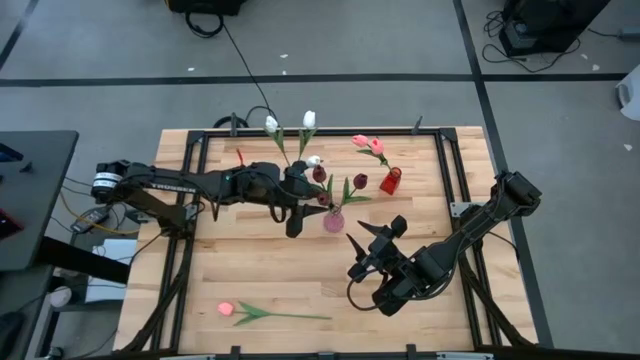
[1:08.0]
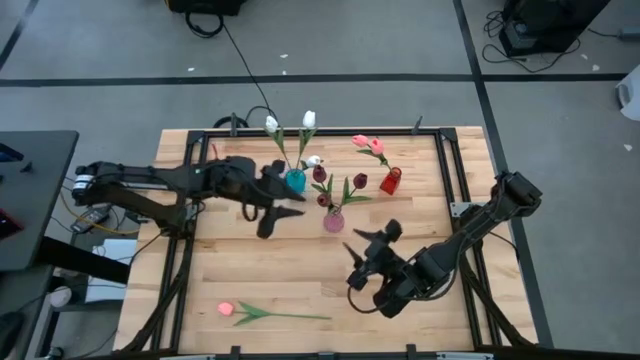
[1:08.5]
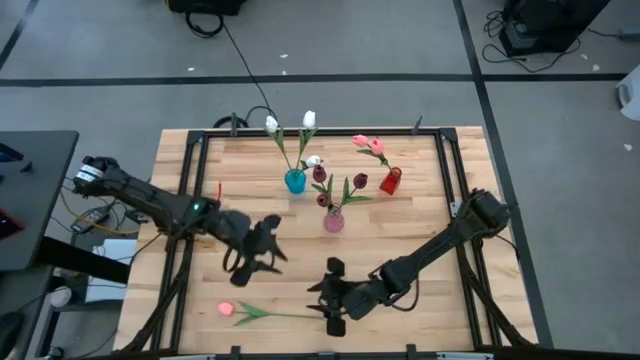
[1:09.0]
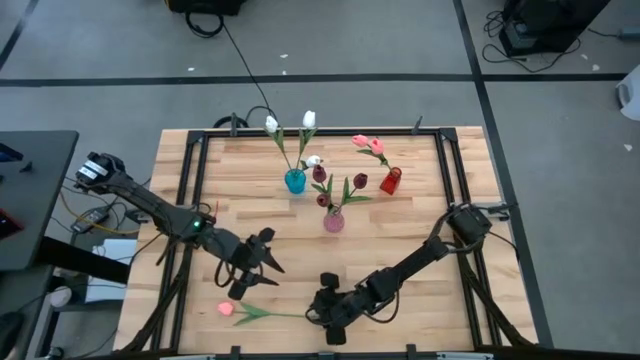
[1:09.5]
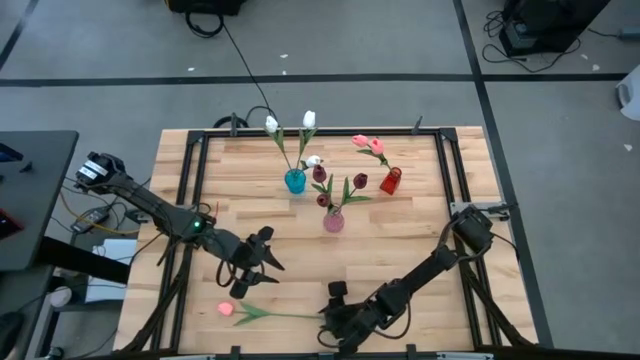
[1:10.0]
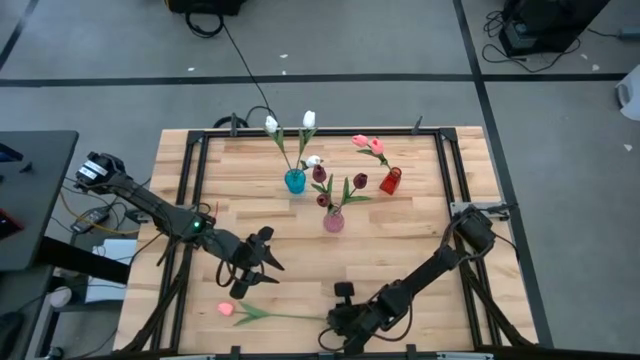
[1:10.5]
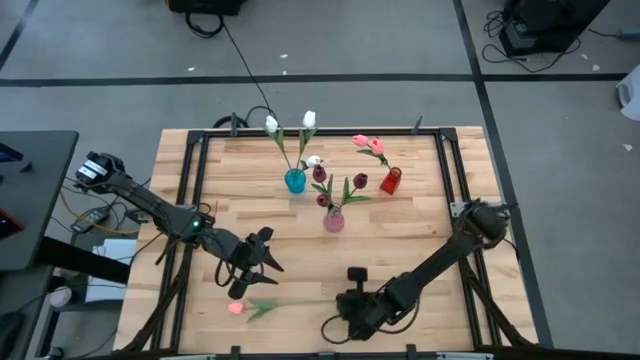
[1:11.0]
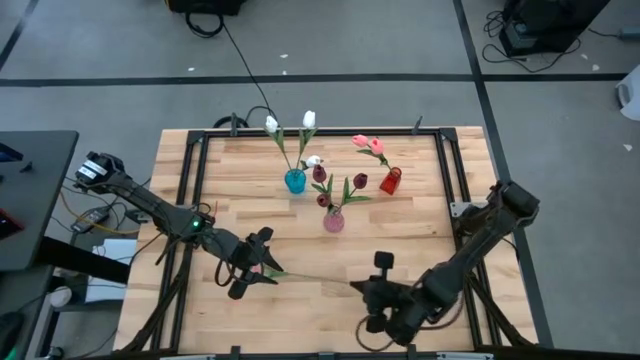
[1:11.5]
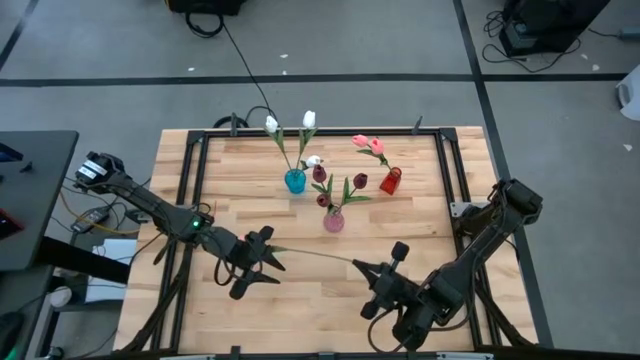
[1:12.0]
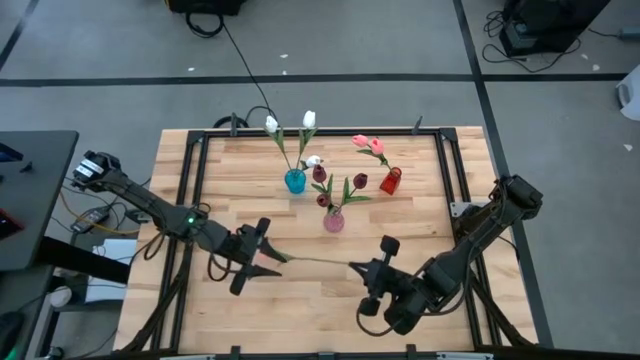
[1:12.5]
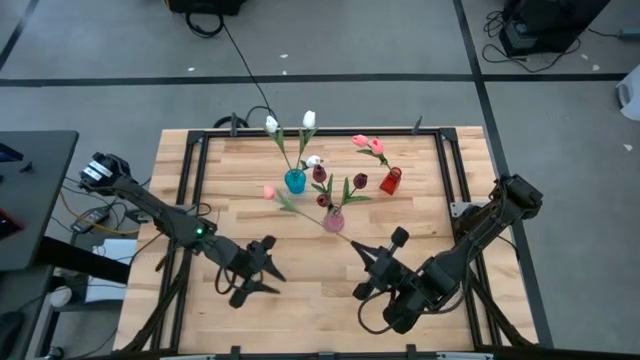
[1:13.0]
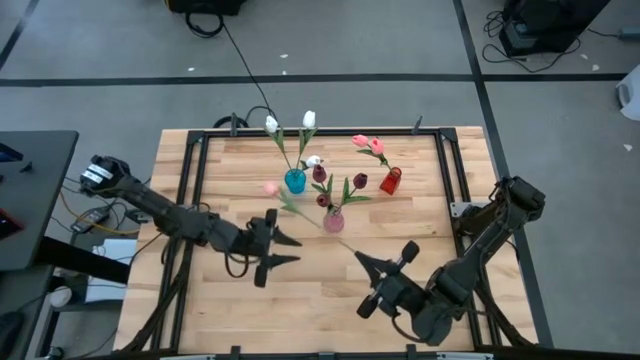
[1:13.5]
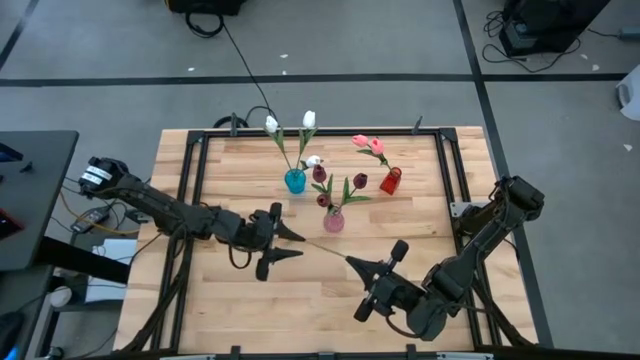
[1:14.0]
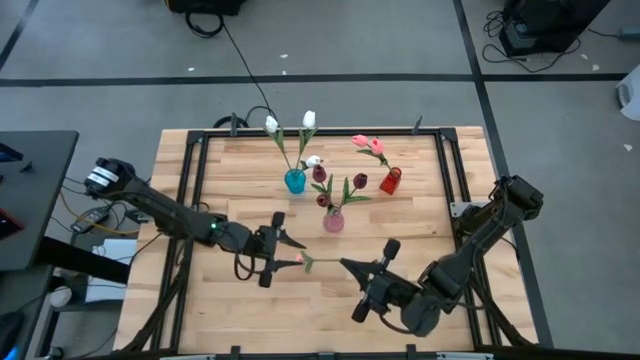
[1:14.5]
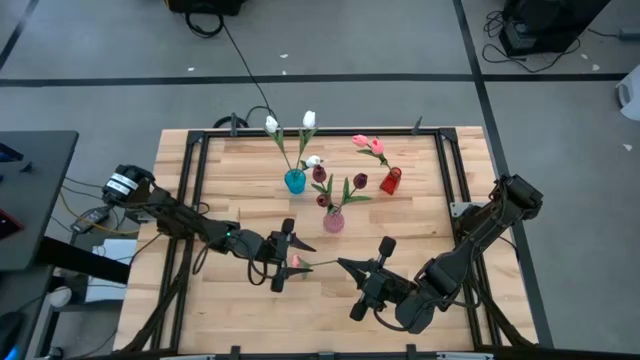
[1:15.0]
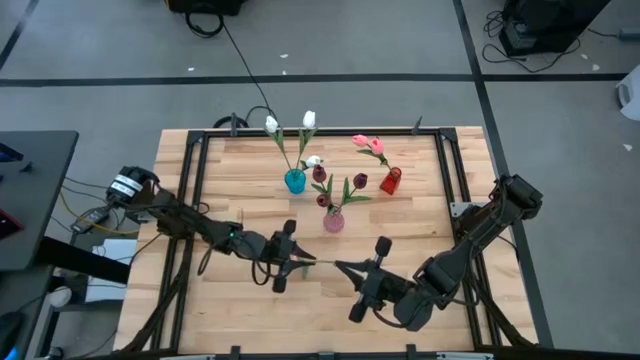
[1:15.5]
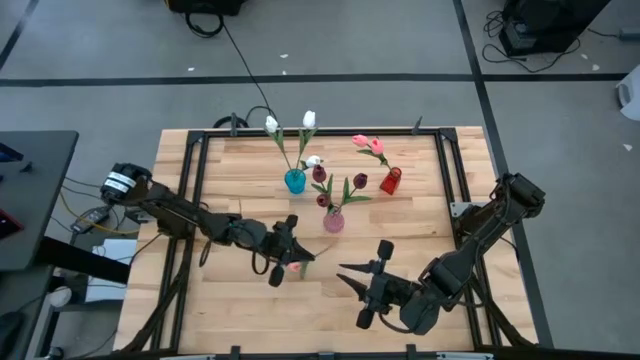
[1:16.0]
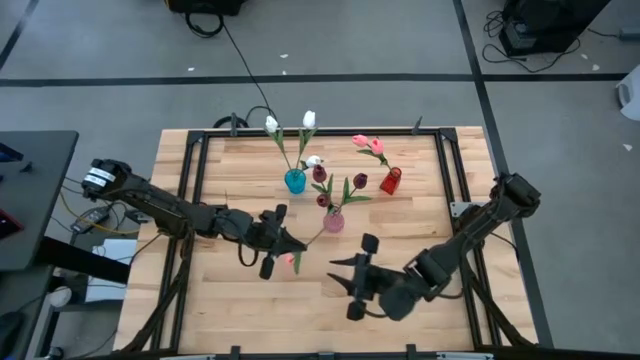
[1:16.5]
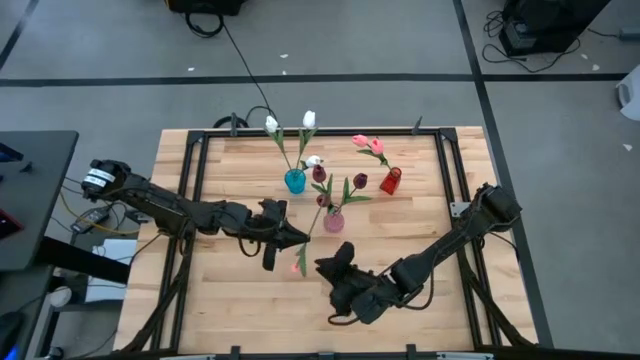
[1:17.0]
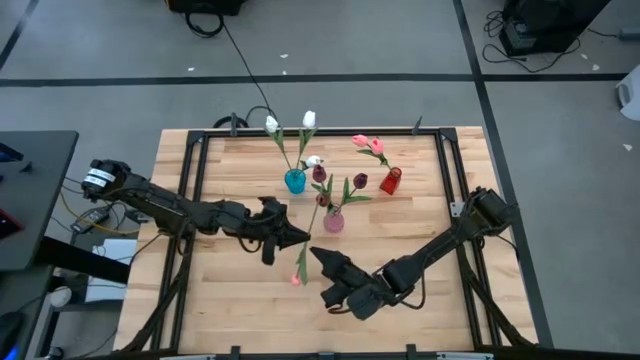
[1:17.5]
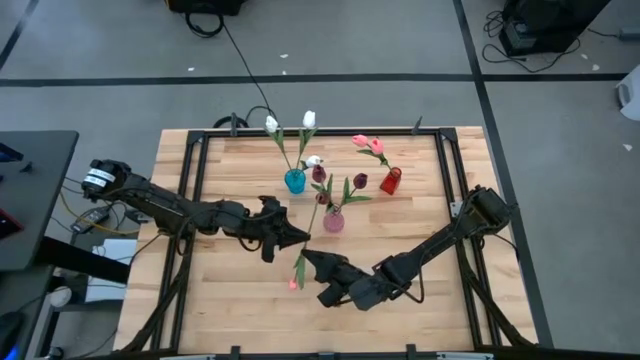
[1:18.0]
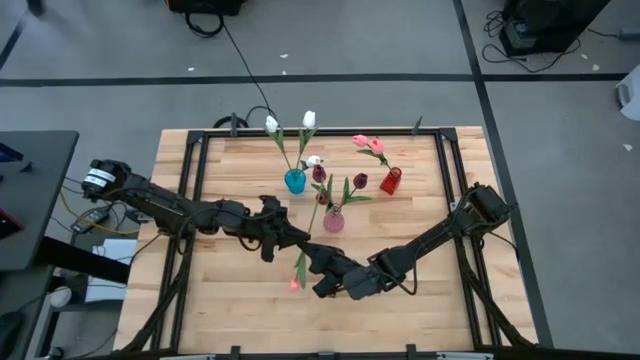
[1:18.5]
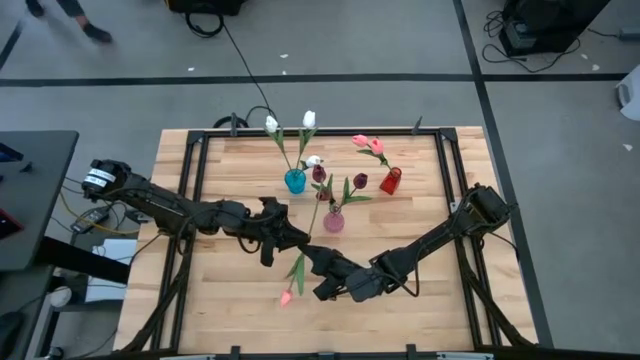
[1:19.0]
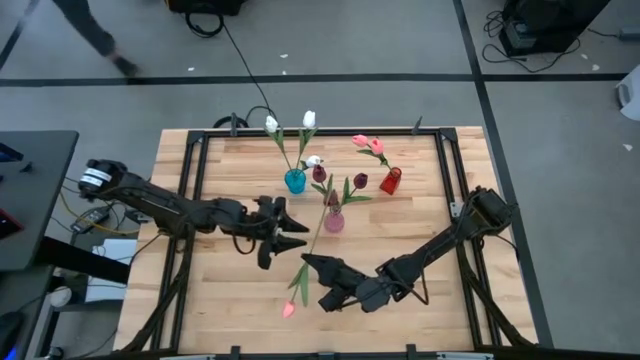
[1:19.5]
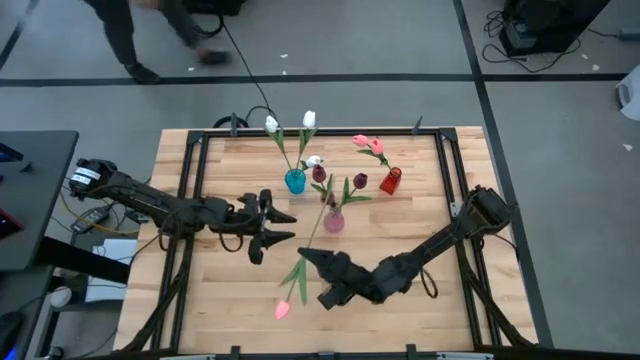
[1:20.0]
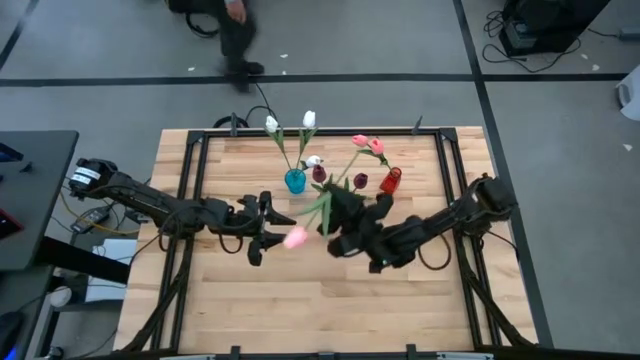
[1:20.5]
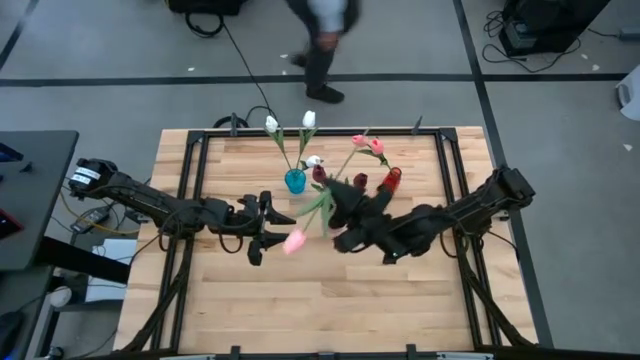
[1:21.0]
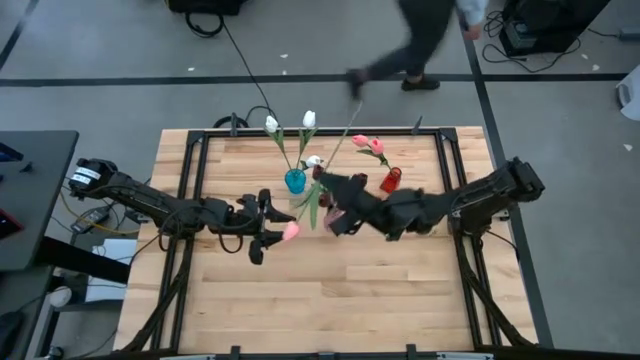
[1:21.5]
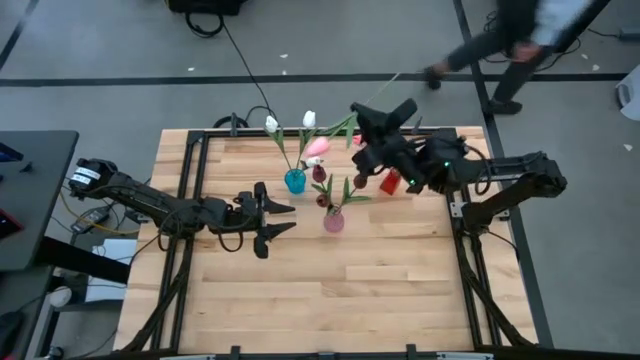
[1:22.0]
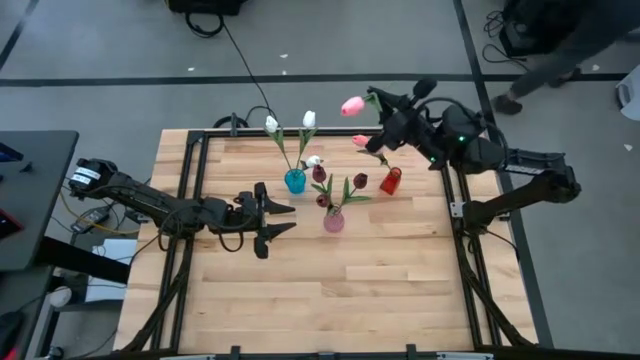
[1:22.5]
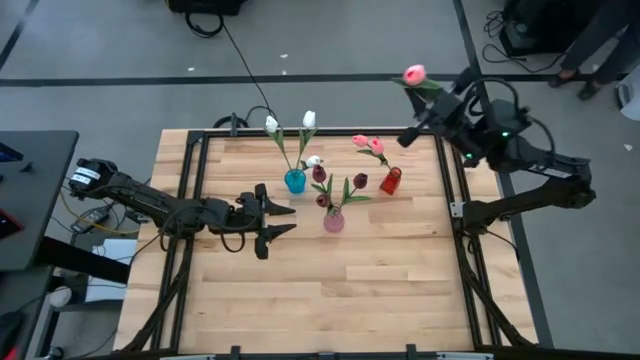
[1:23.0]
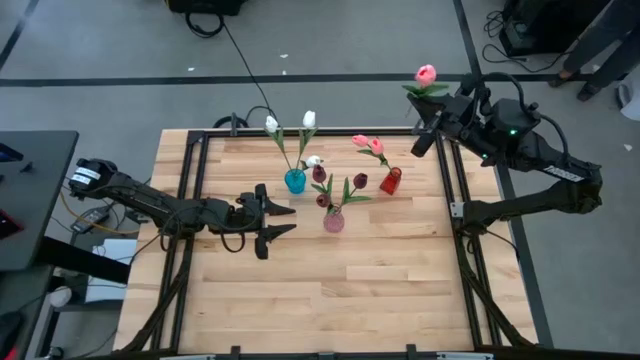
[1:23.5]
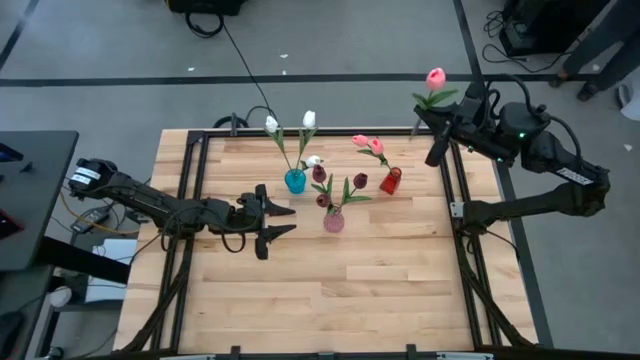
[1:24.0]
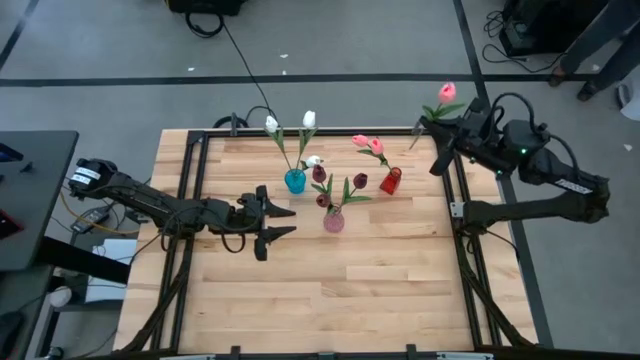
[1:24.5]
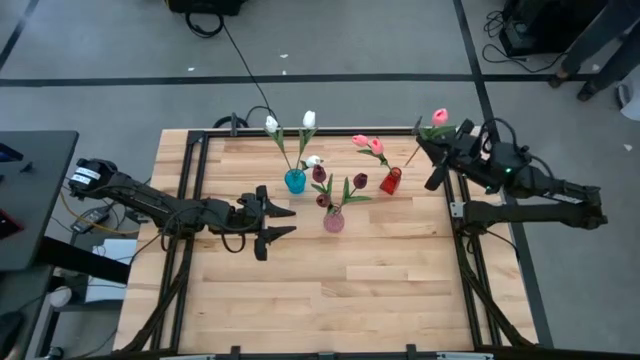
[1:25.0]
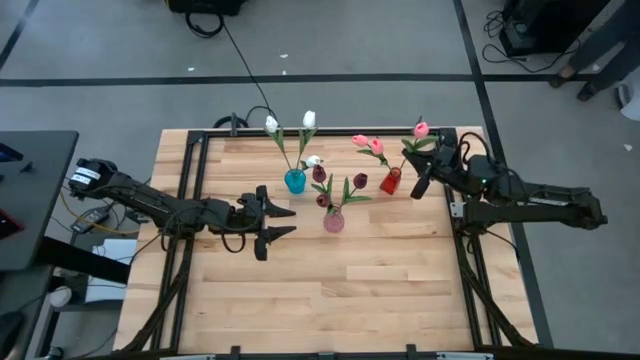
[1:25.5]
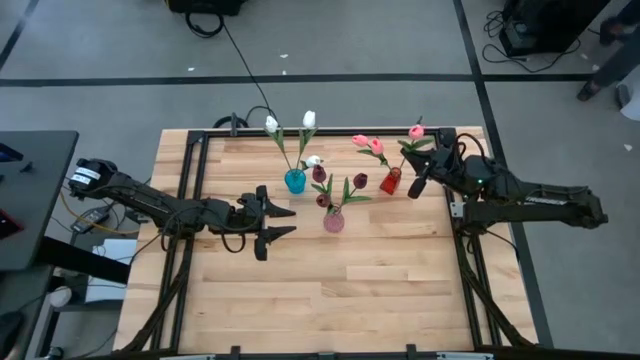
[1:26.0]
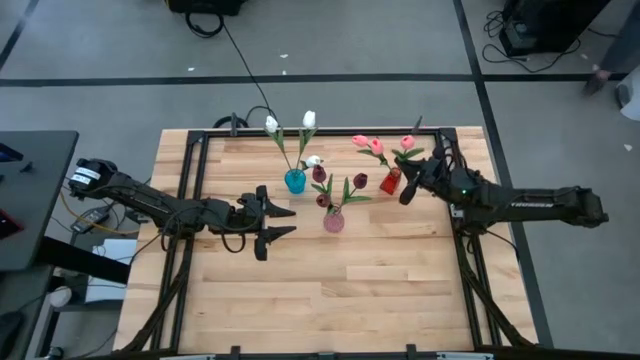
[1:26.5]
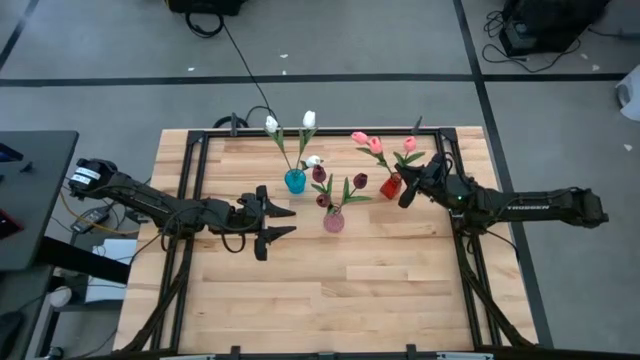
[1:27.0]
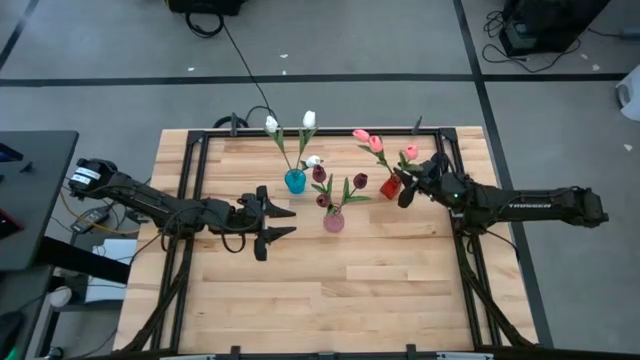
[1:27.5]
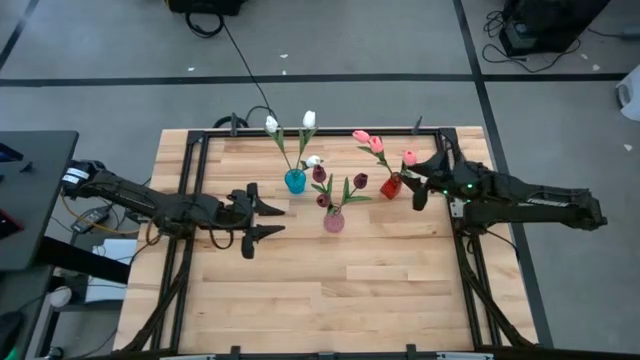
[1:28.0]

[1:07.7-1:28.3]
Task: Sort flowers into vase by color
Put the pink tulip into the red vase

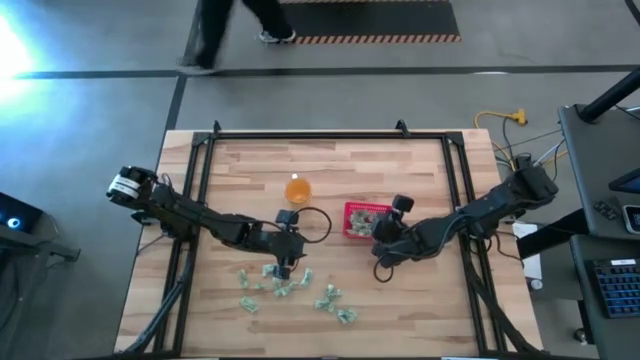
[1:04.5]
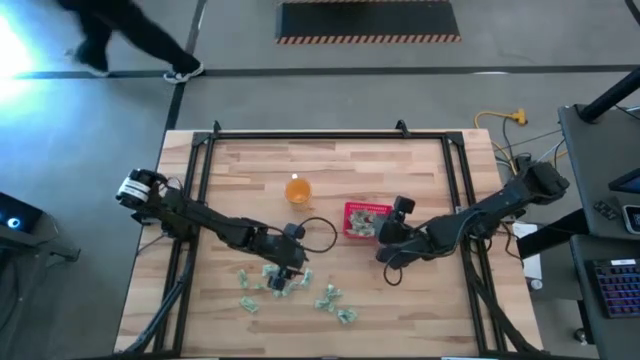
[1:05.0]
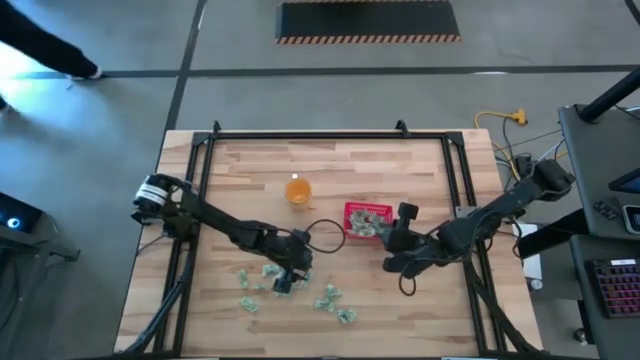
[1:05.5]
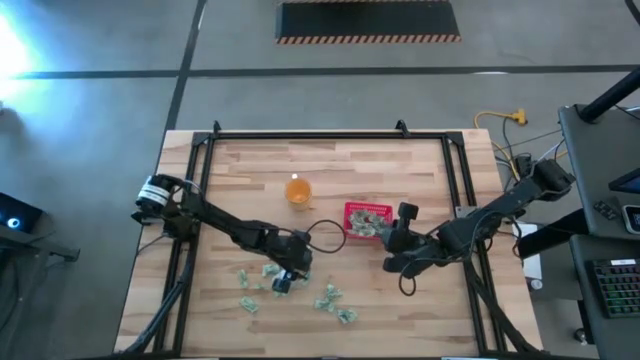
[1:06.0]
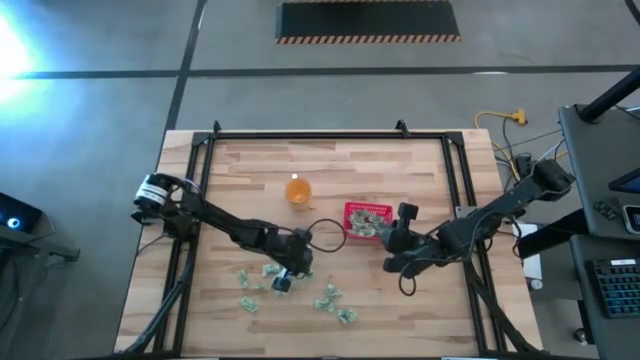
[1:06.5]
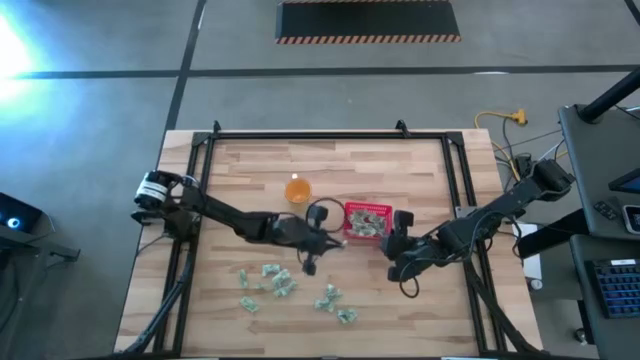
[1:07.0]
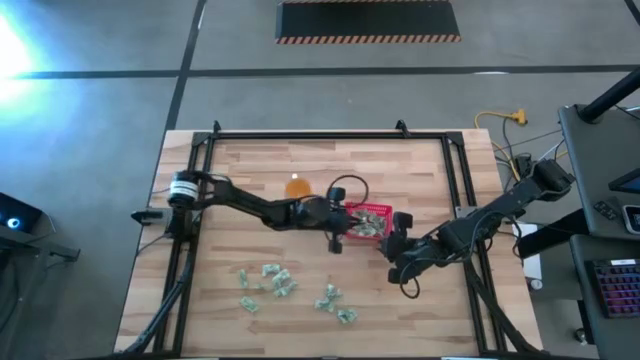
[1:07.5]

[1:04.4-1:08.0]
Task: Pick and place Stevia / Truvia into bins
Put the stevia packet into the basket
